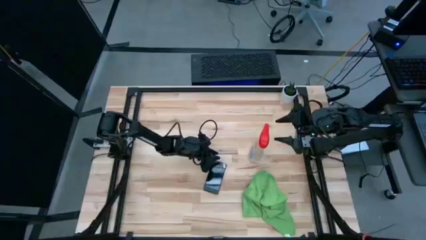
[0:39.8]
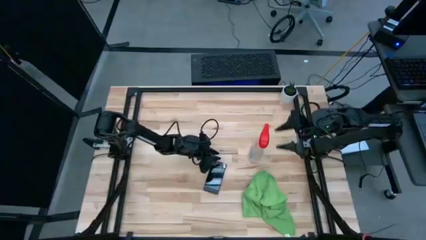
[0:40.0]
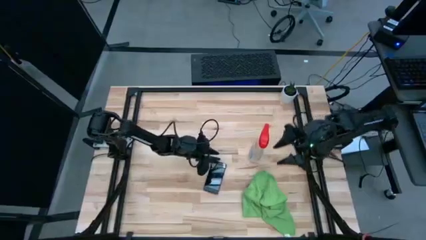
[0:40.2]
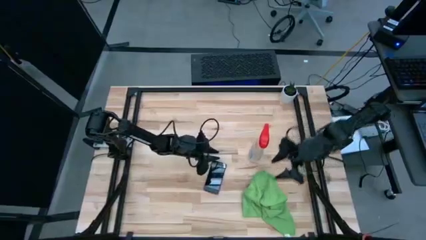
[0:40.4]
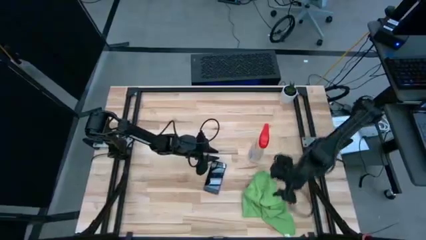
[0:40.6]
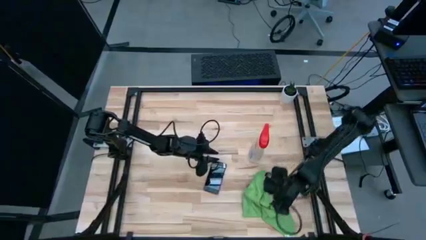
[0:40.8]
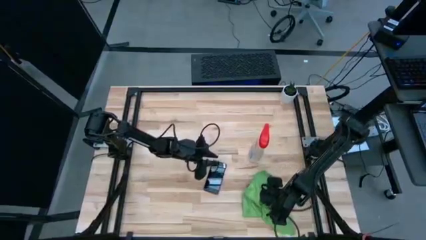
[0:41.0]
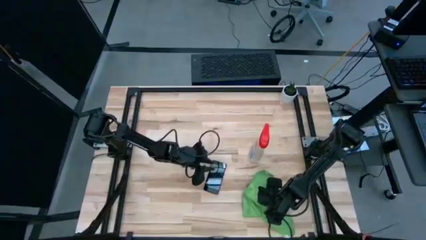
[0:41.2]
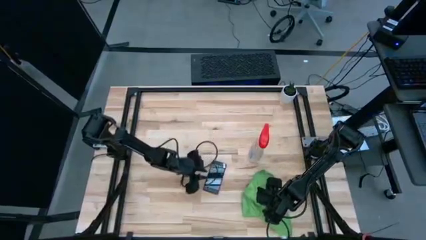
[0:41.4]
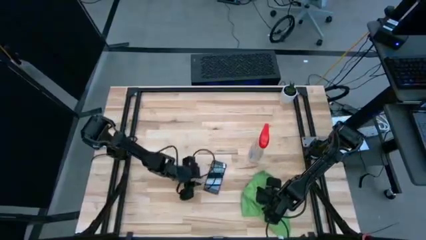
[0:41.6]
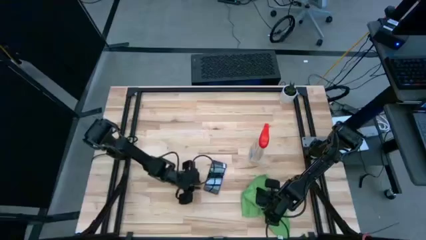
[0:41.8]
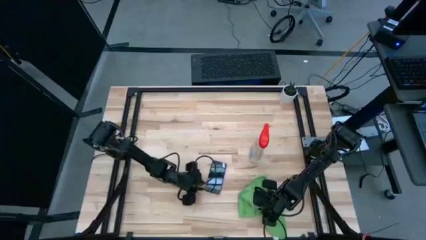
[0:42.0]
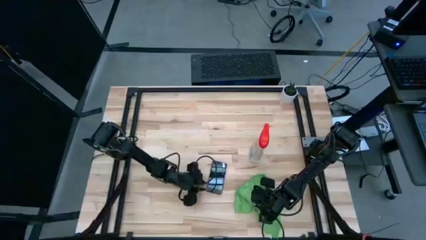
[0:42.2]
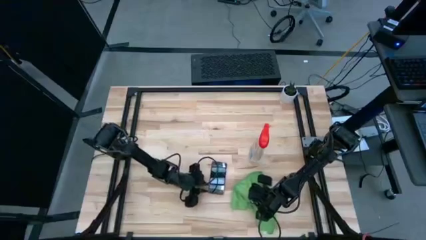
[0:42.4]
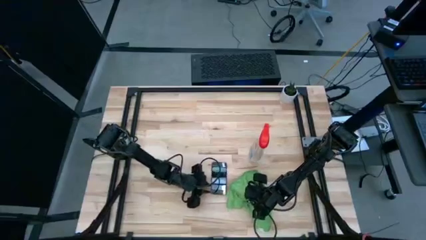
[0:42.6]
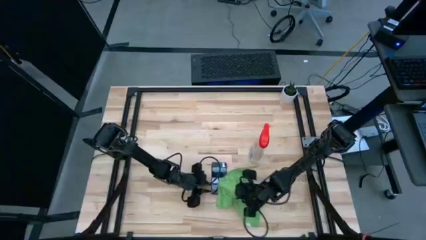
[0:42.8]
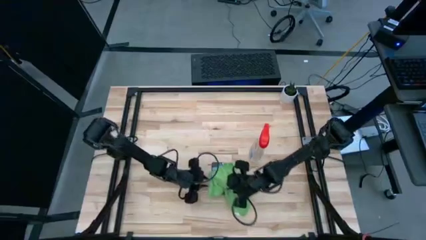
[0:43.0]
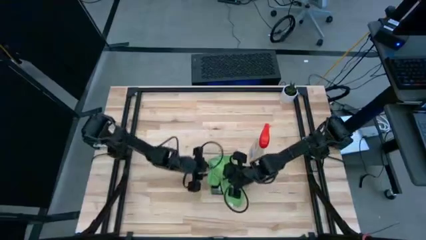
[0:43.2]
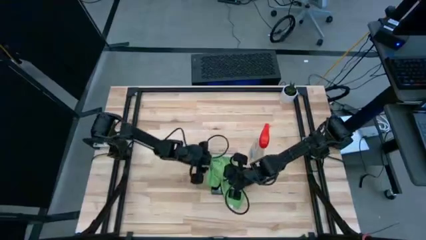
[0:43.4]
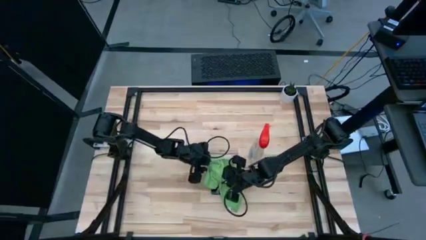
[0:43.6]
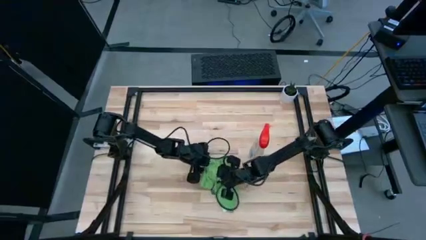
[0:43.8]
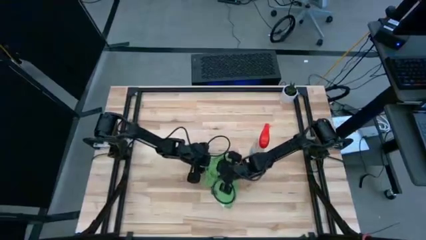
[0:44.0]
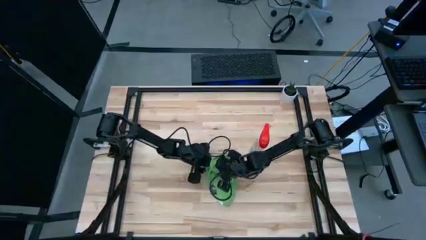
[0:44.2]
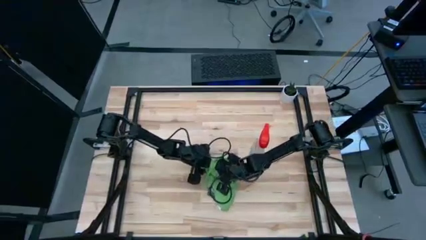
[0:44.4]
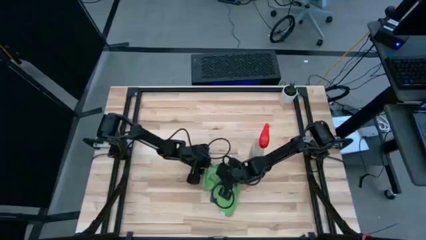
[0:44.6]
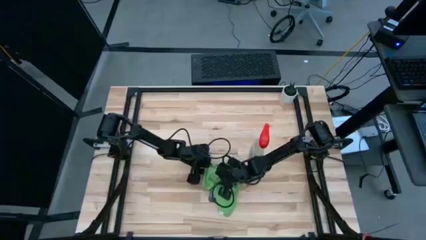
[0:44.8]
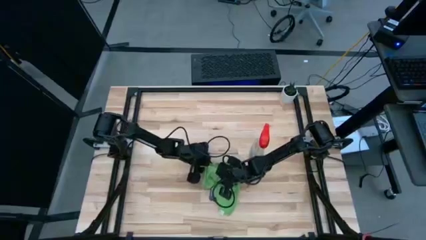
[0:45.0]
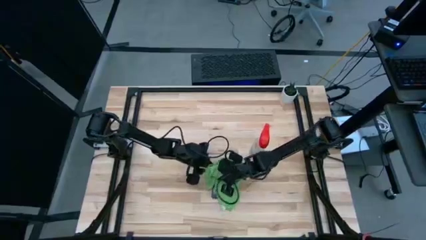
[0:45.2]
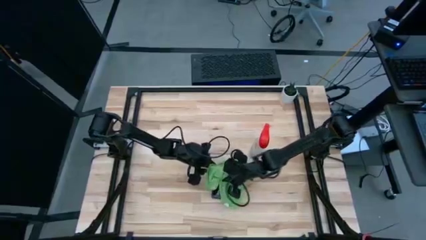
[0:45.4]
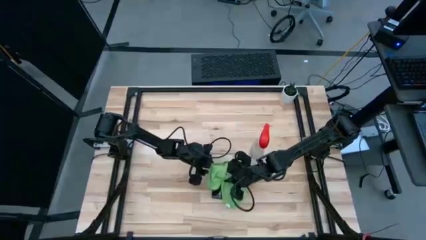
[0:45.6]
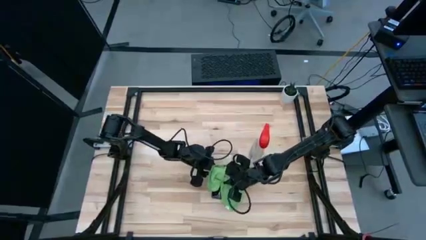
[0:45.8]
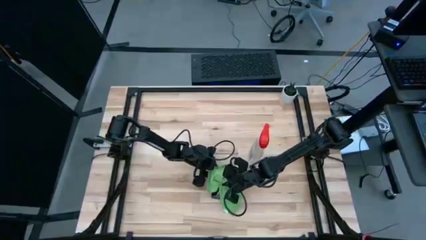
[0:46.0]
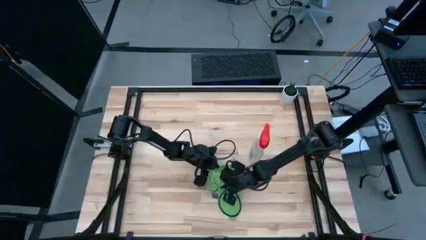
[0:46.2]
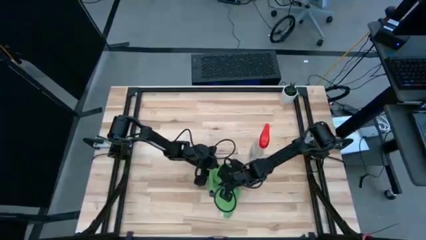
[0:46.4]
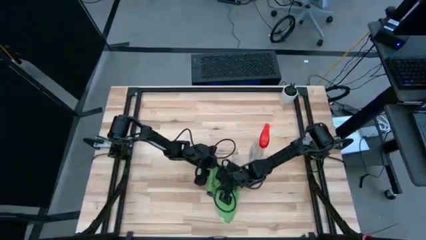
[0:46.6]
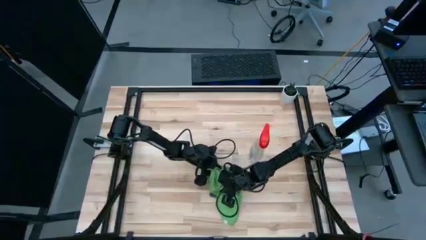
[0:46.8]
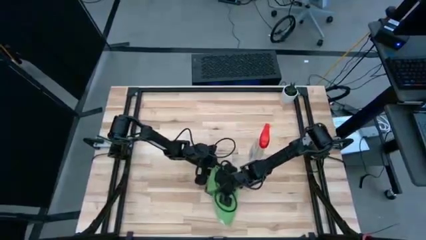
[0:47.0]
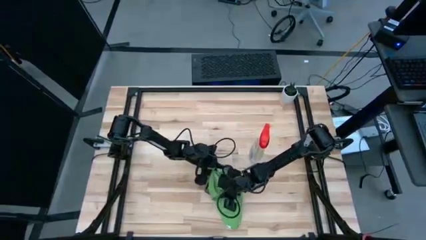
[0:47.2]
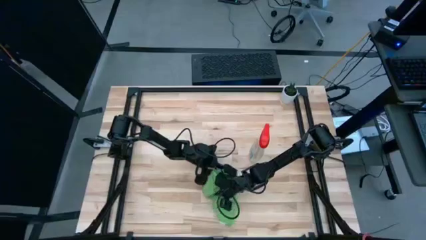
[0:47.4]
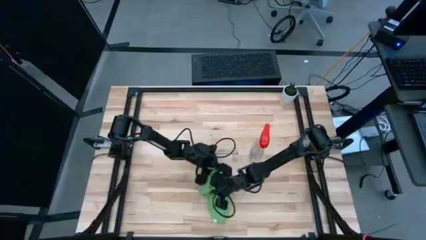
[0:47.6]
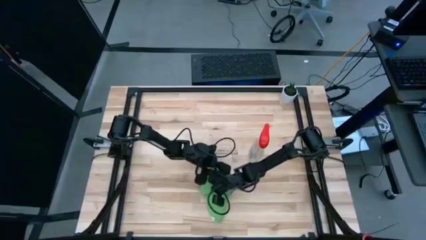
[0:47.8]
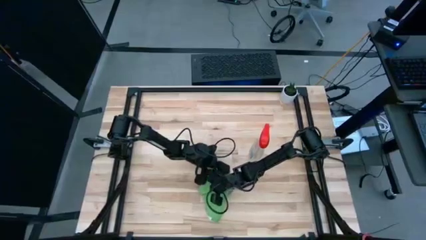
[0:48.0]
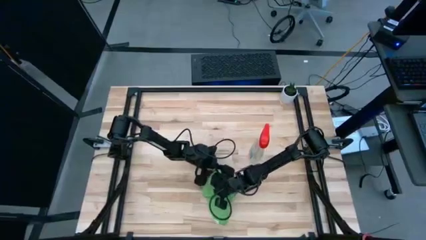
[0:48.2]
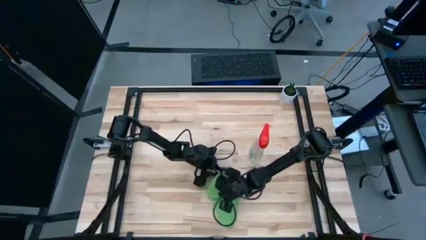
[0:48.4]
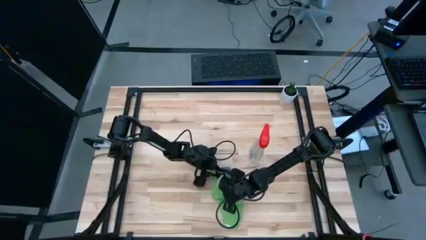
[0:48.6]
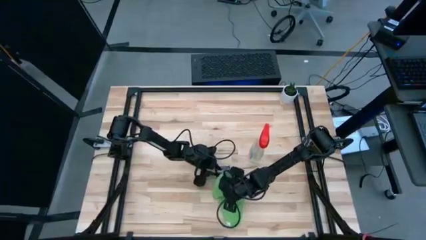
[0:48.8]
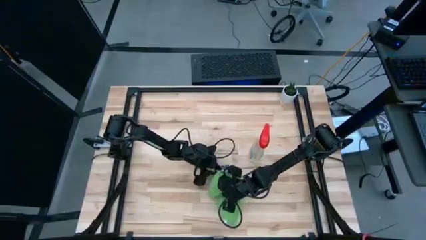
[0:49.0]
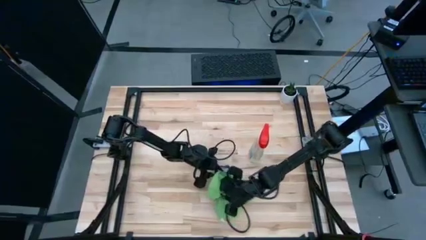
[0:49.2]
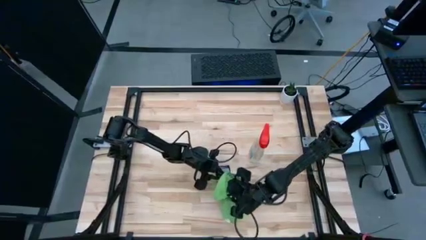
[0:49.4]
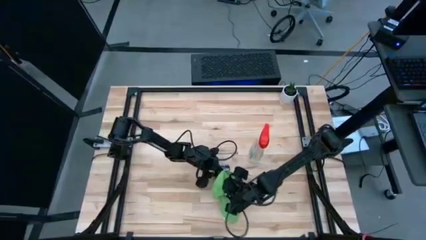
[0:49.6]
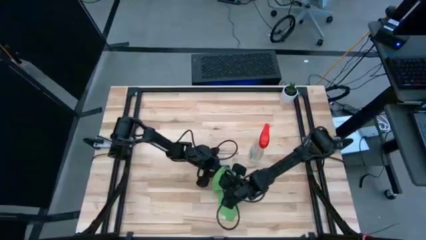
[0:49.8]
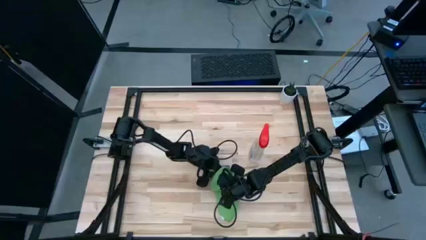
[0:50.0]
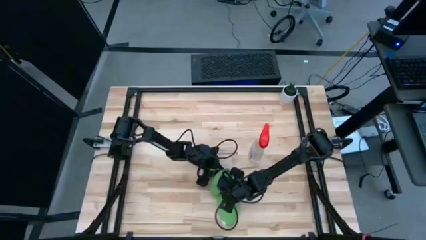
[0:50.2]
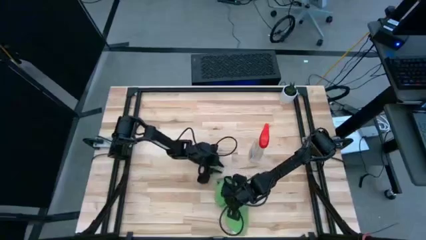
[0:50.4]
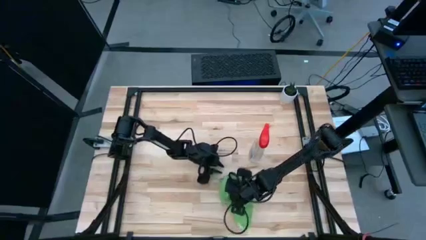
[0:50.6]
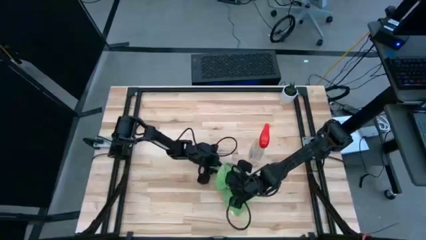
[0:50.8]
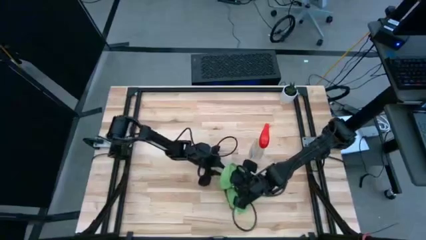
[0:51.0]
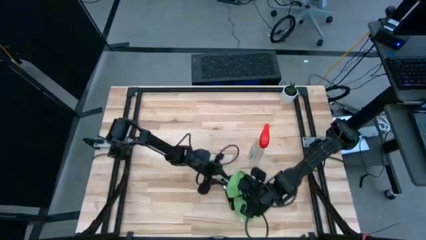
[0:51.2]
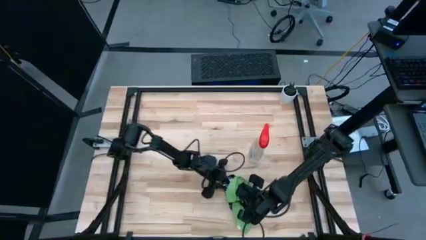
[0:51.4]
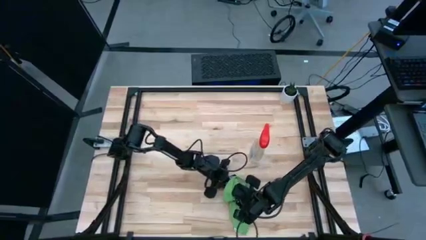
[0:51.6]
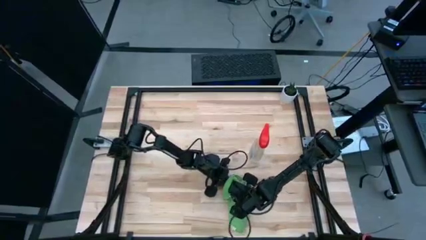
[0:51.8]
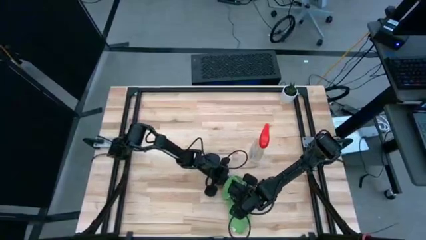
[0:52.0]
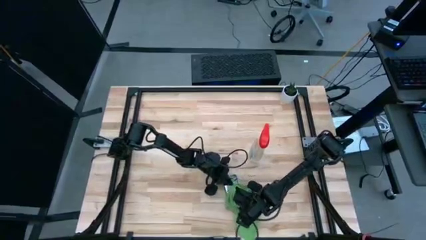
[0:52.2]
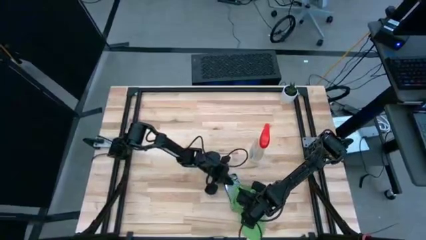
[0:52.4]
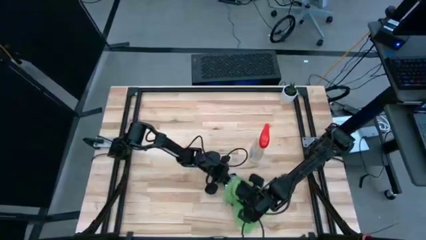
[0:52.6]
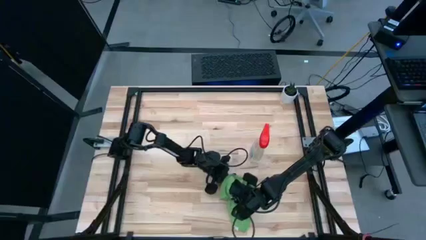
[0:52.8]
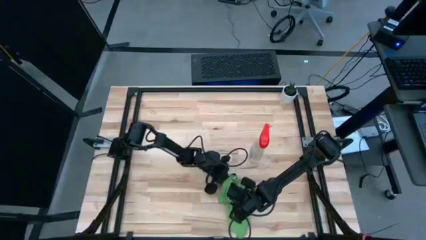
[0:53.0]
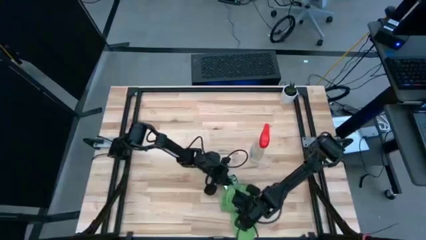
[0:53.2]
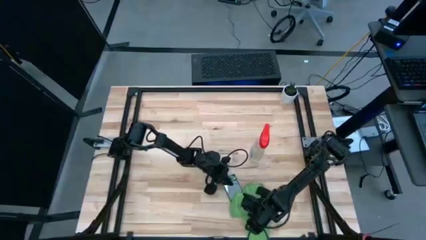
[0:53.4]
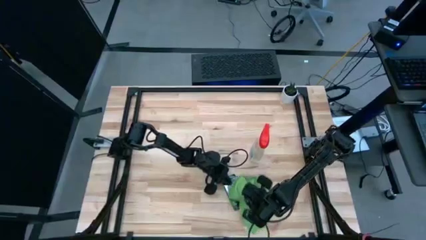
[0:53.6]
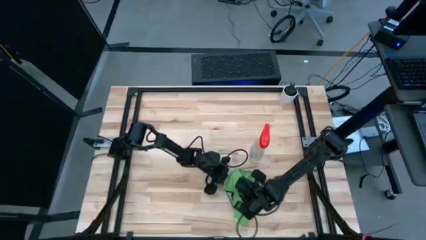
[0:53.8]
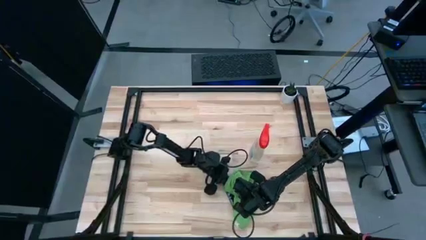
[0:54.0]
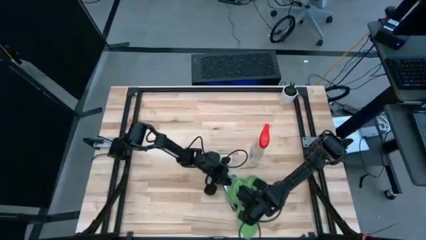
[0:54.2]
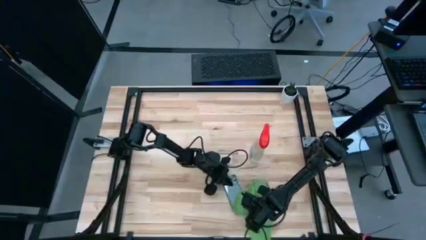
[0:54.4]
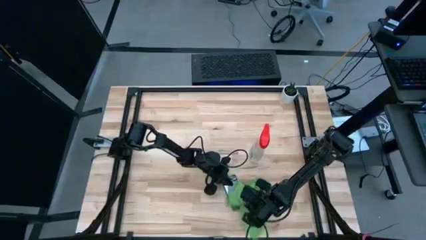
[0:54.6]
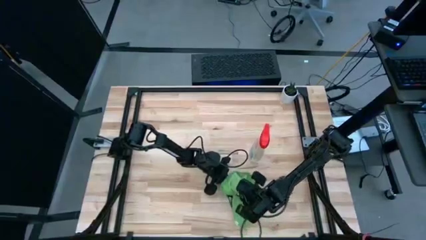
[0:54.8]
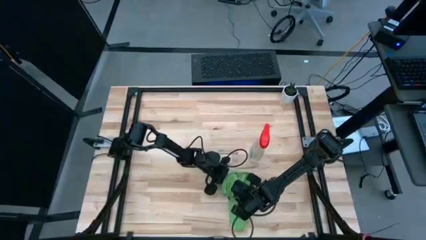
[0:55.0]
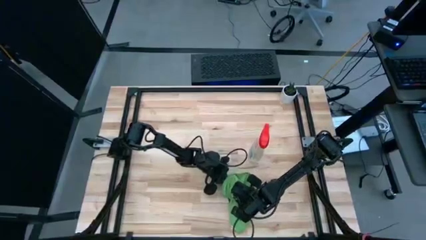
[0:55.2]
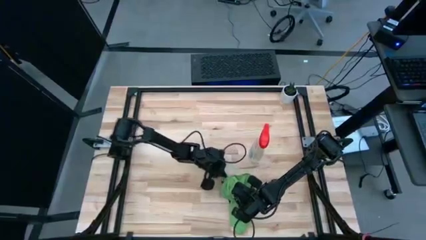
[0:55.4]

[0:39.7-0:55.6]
Task: Apply microfiber cloth
Wipe the front of the cellphone with the green microfiber cloth
